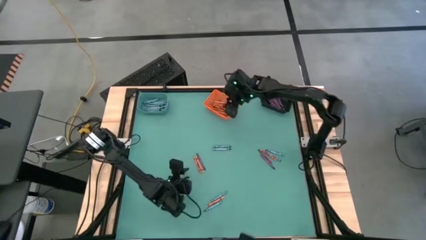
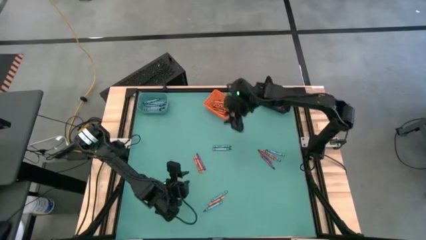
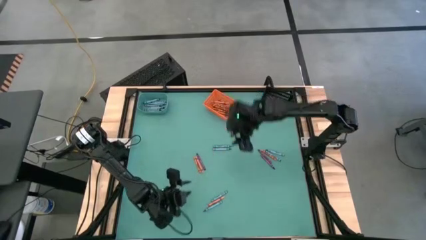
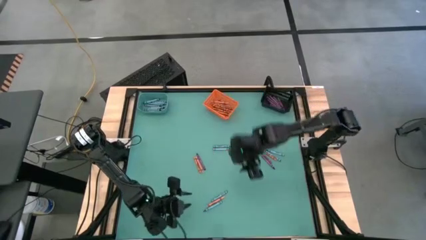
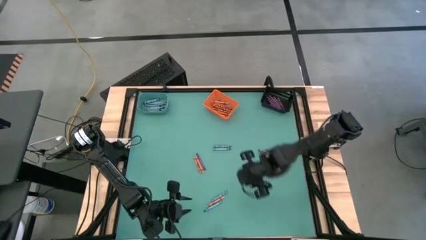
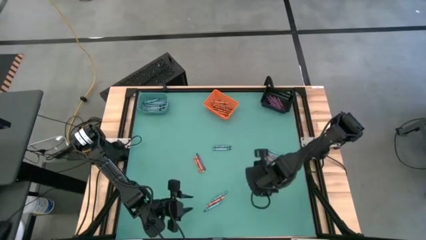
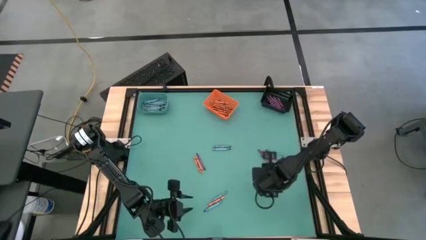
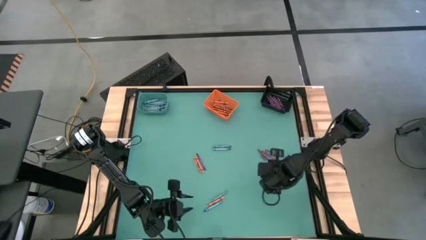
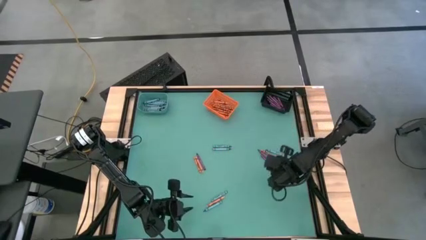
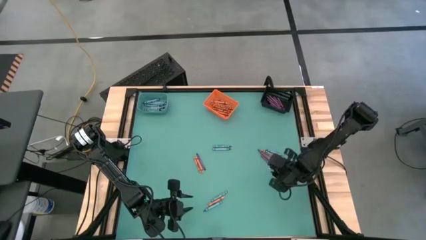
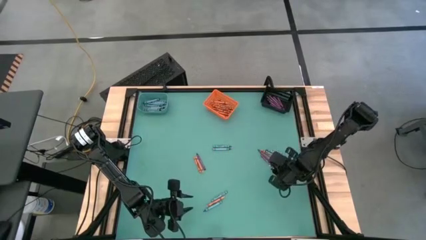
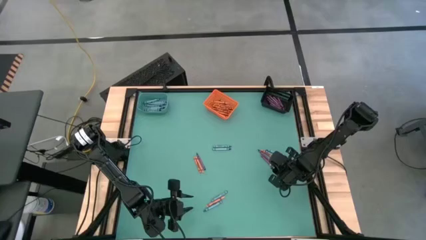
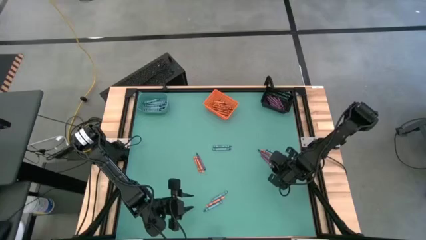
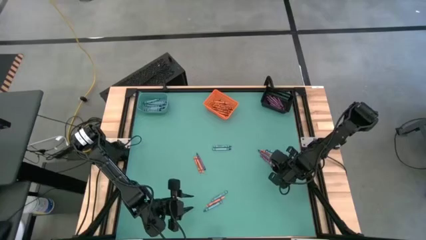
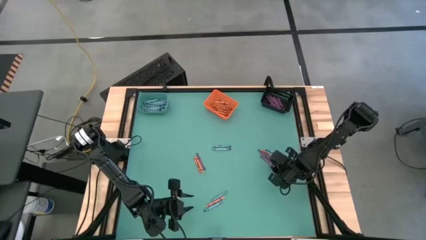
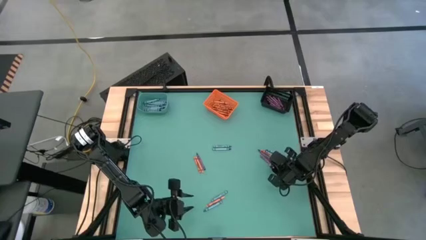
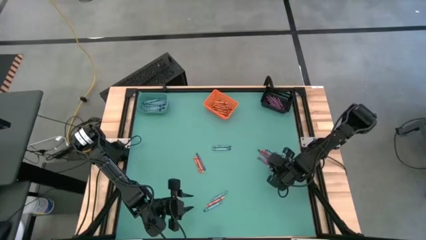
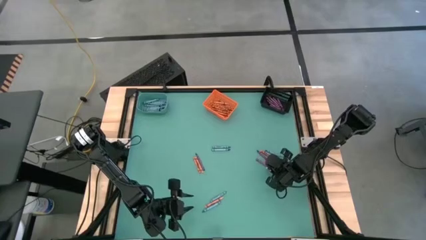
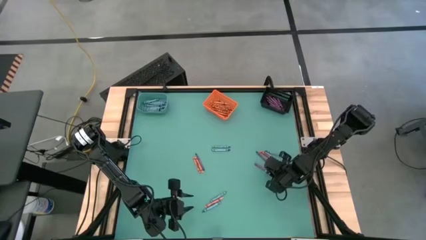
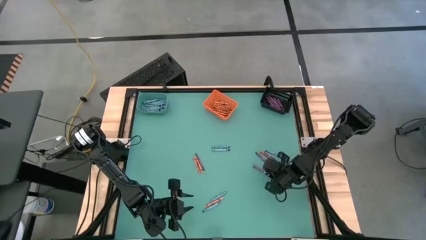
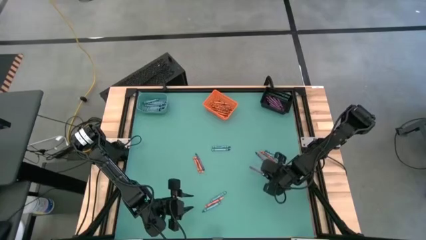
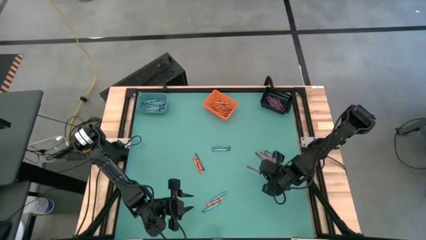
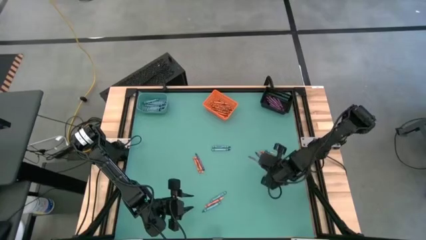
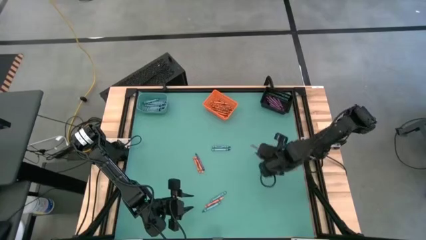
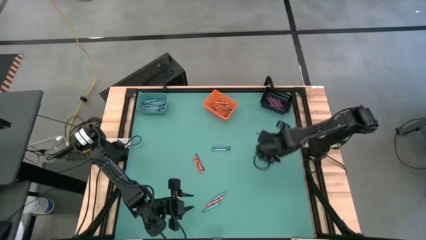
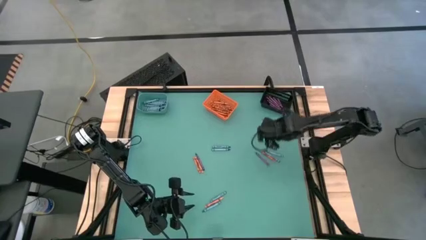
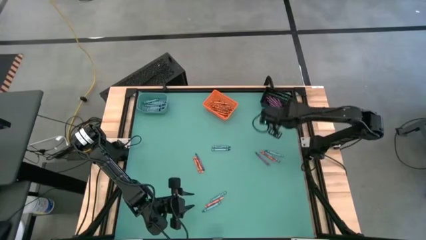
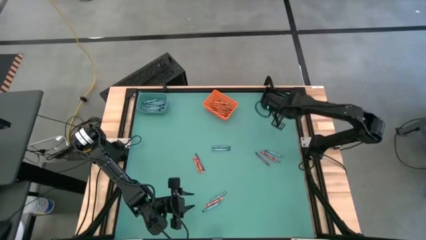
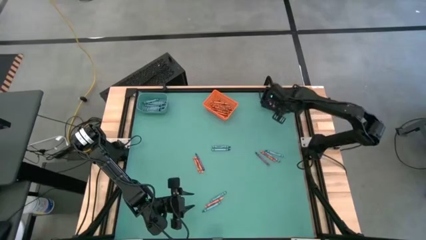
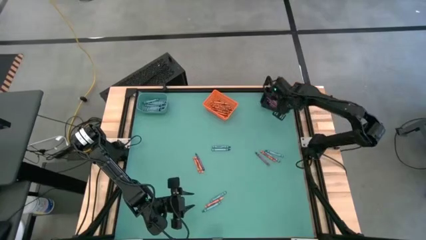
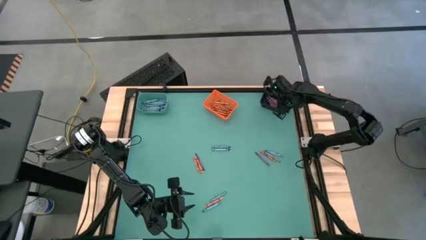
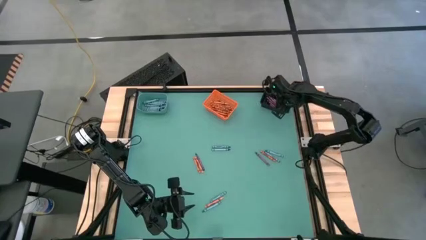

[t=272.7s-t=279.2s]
Task: Sort crayons
Put the crayon into the black bin

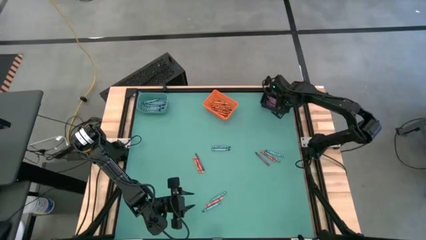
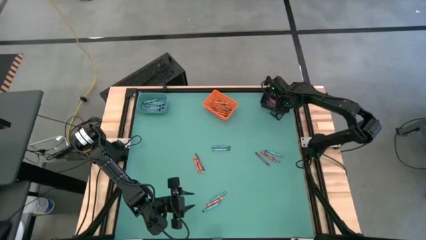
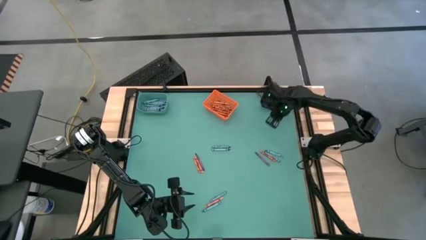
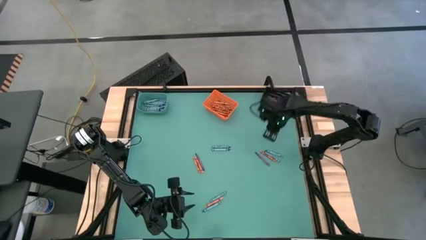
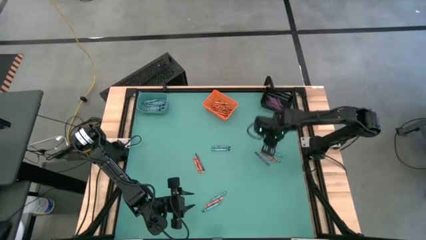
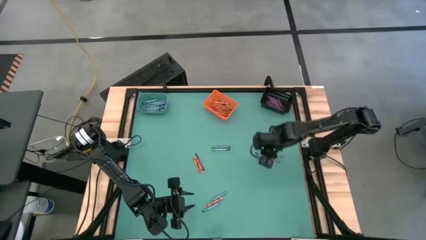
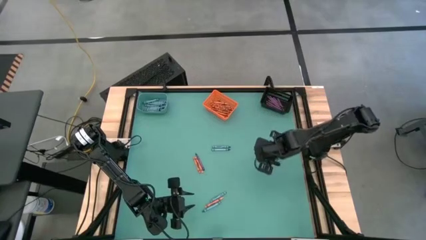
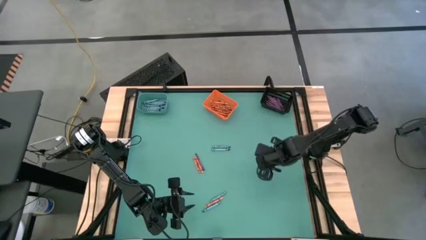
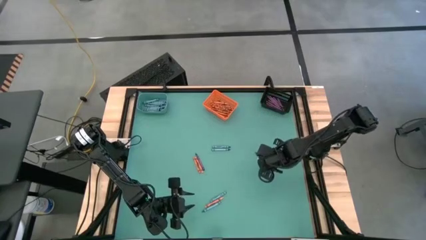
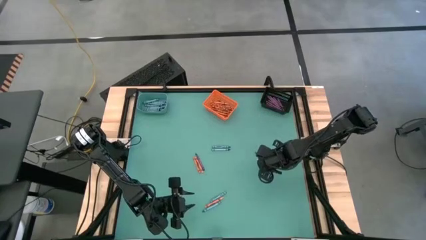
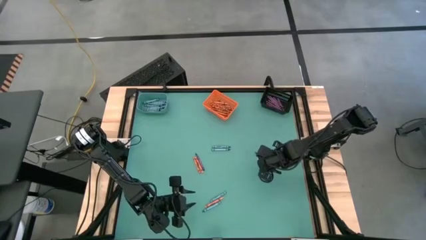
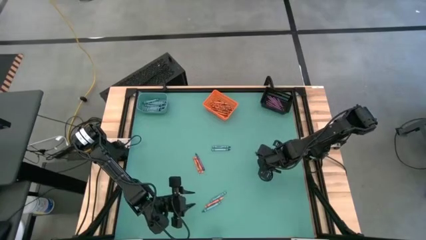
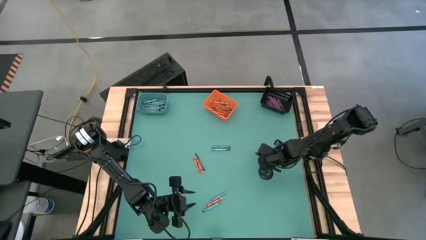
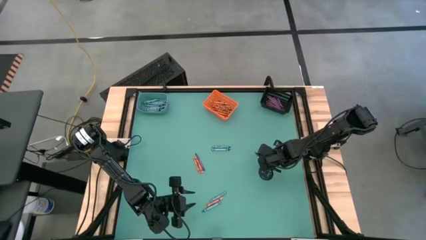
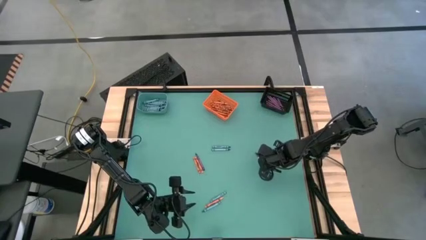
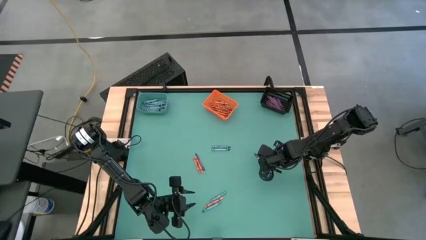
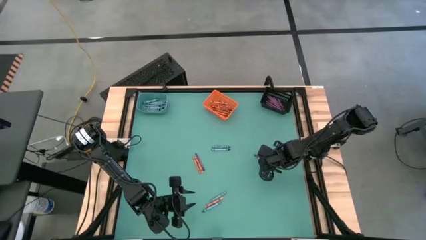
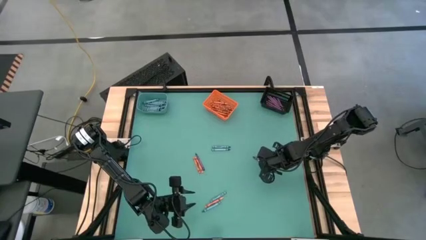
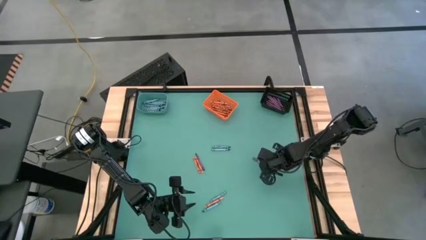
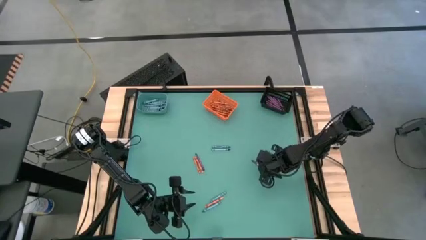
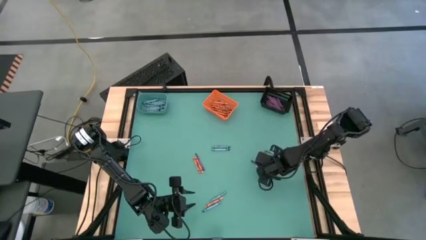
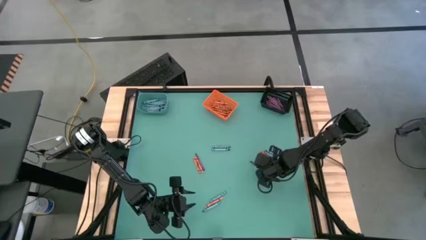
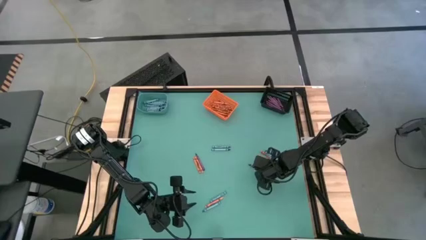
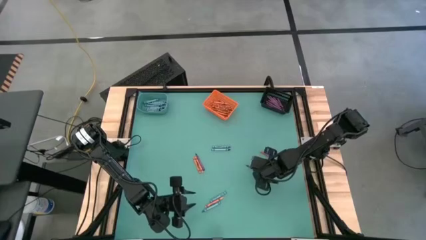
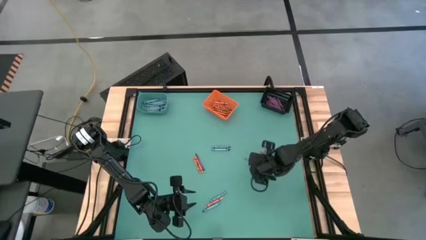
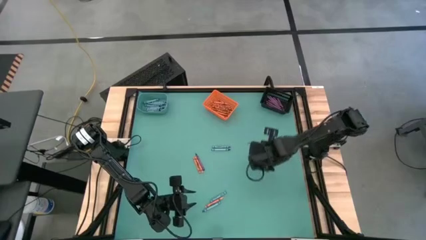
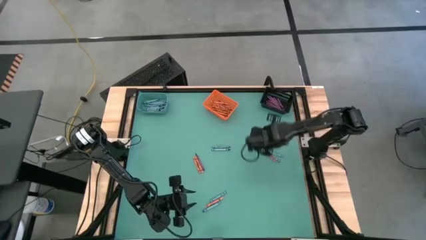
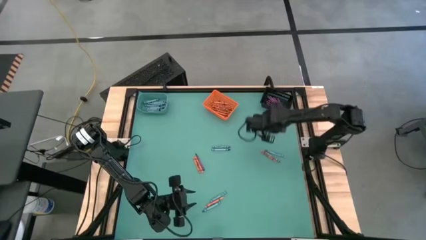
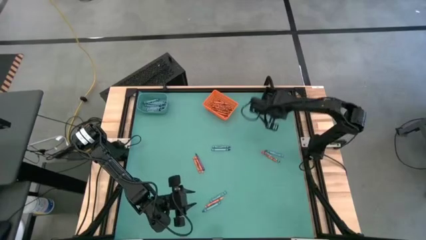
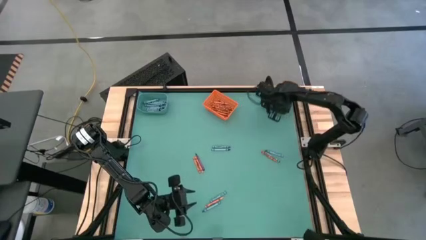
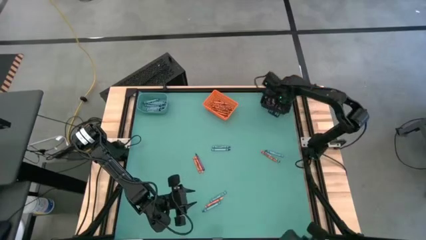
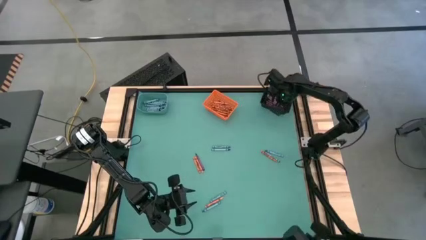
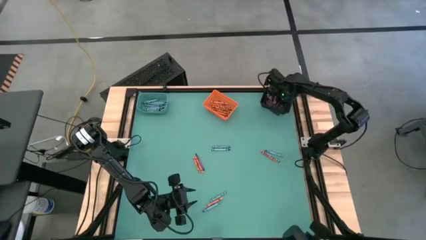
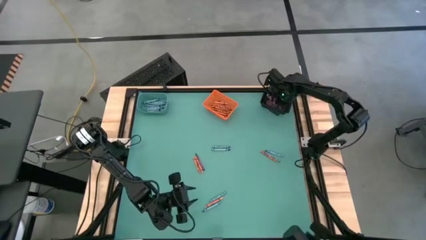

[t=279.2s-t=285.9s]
Put the crayon into the black bin

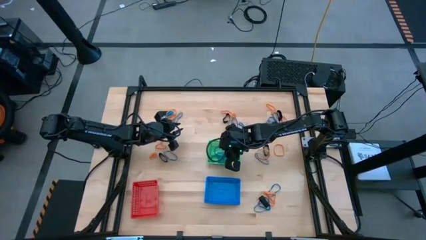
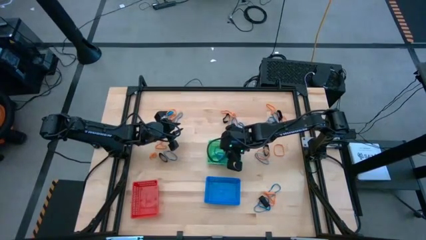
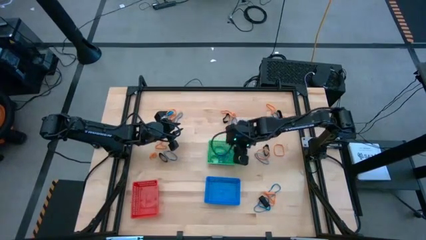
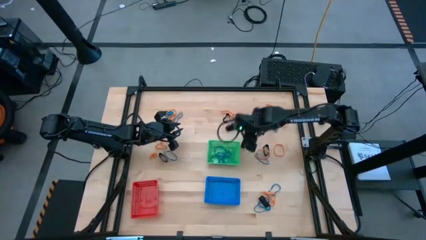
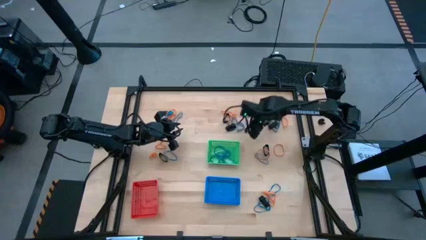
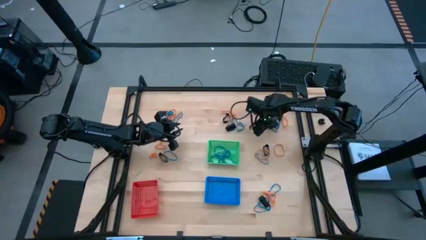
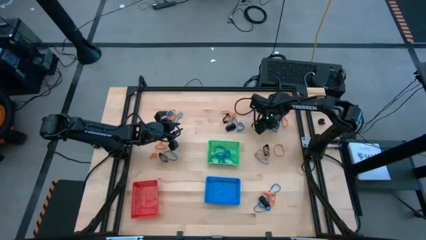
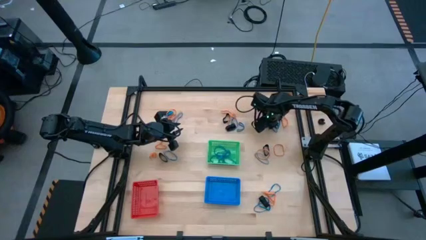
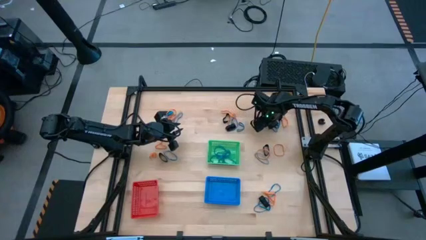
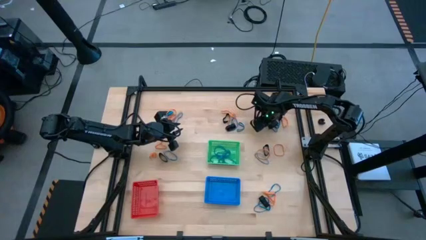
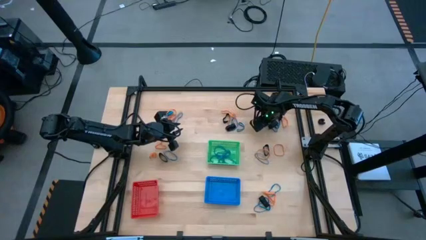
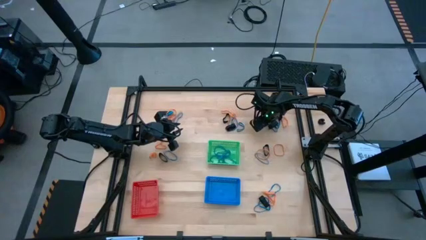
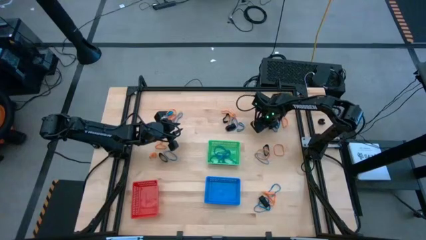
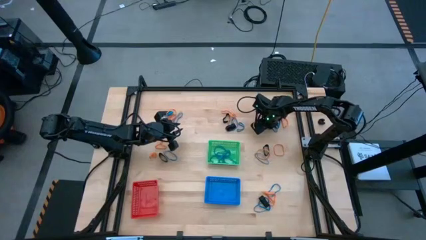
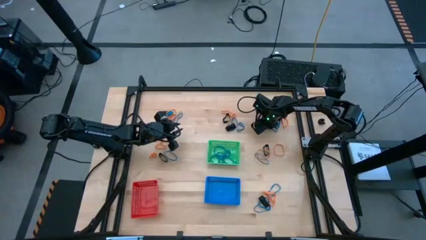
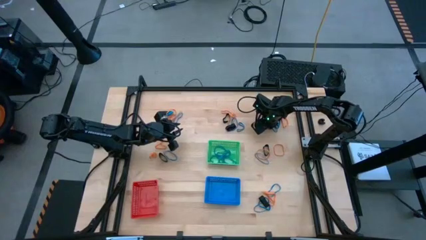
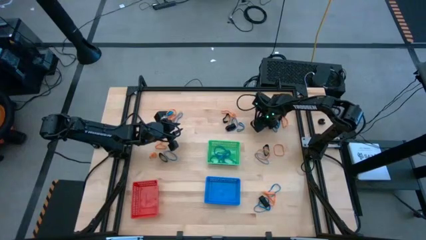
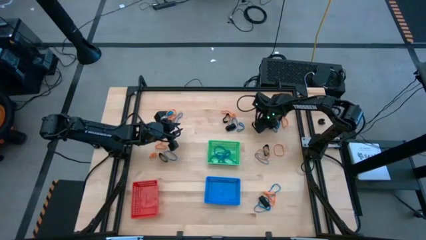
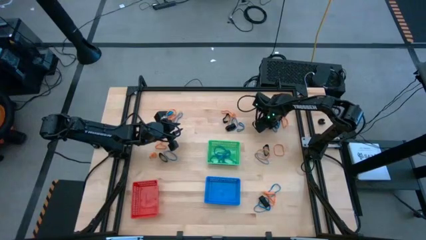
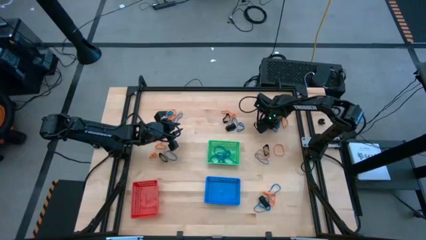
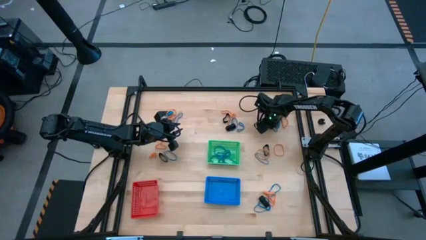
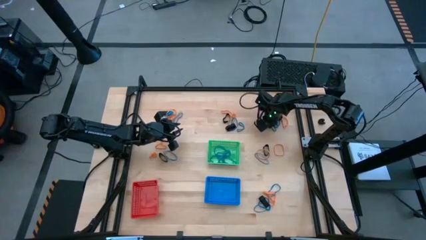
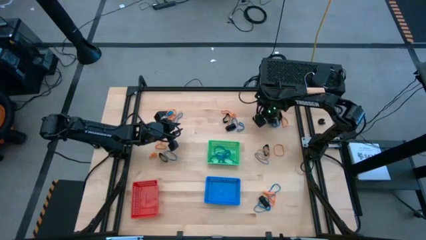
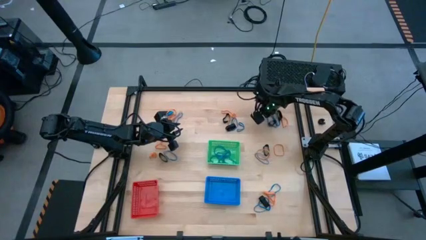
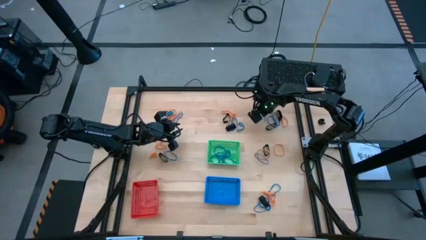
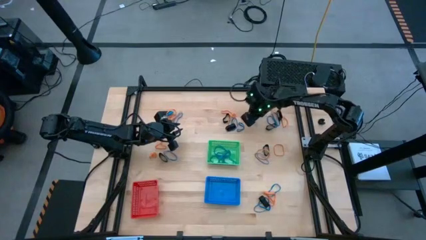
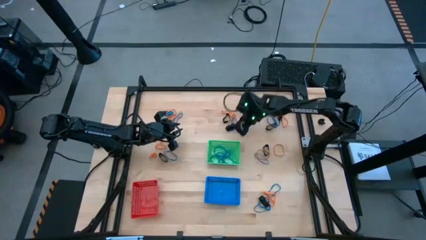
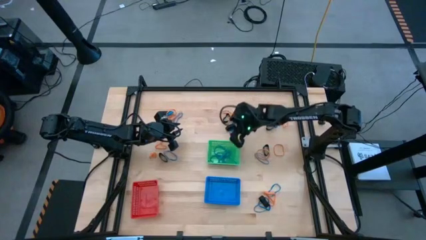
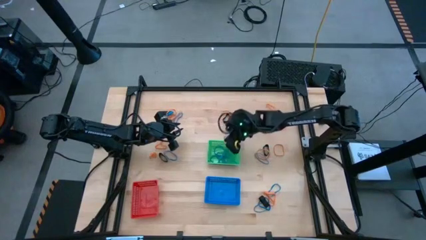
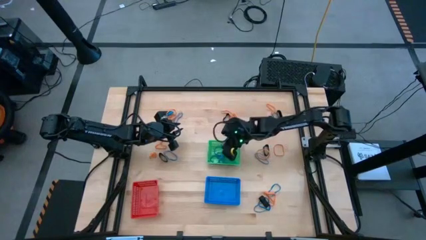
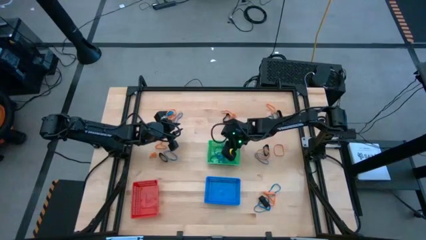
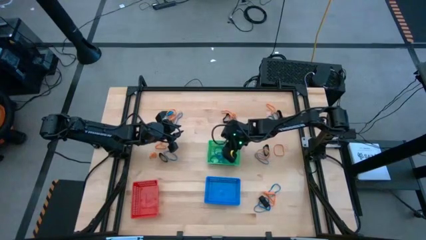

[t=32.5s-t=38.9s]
Task: Sort rubber bands into baskets
Put the blue rubberband into the green bin
